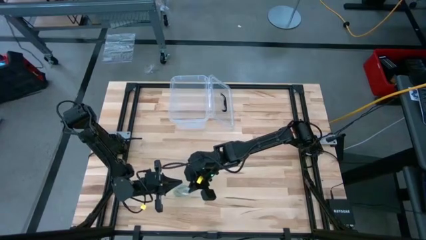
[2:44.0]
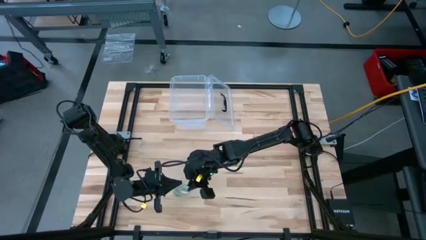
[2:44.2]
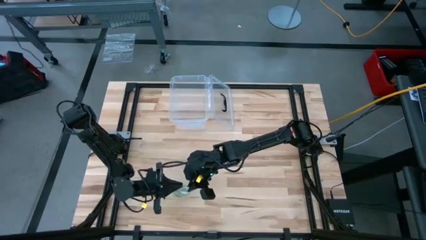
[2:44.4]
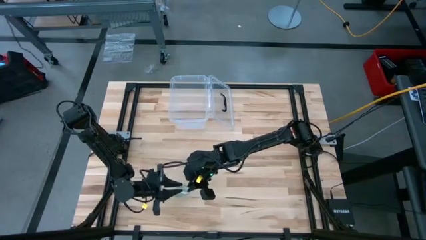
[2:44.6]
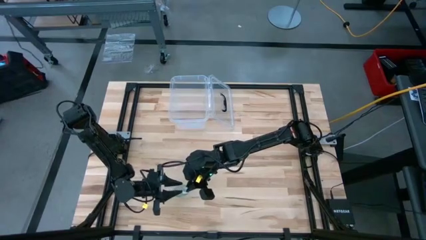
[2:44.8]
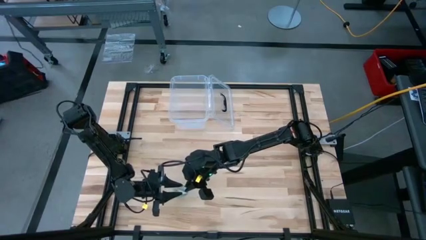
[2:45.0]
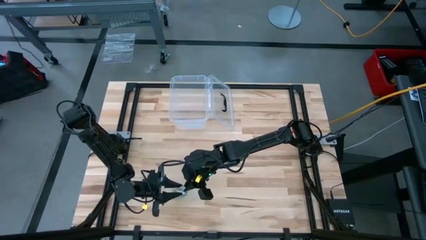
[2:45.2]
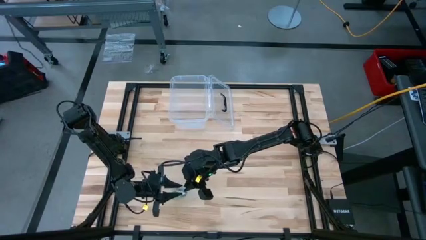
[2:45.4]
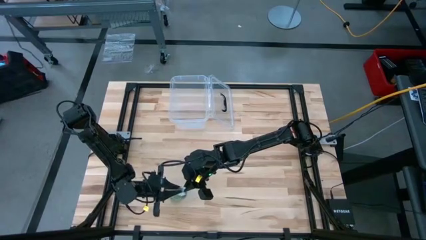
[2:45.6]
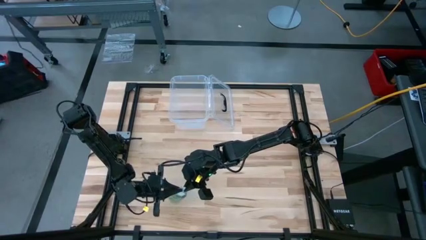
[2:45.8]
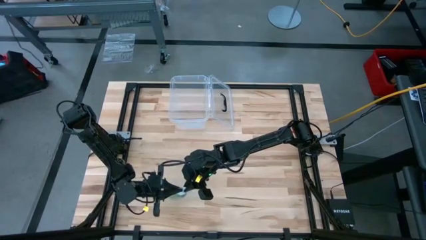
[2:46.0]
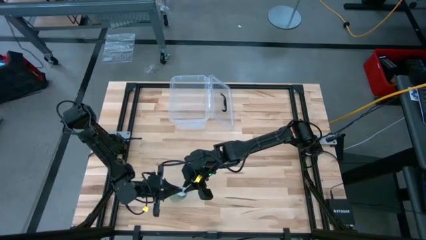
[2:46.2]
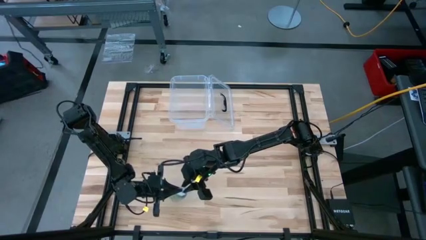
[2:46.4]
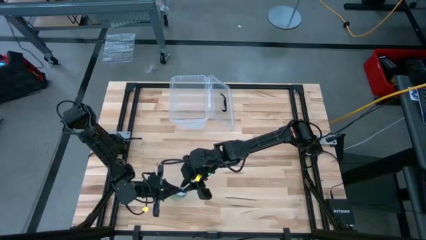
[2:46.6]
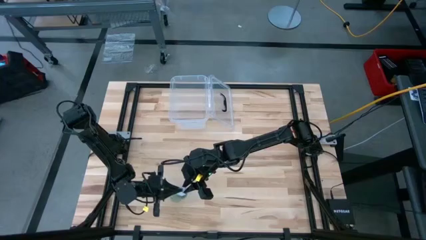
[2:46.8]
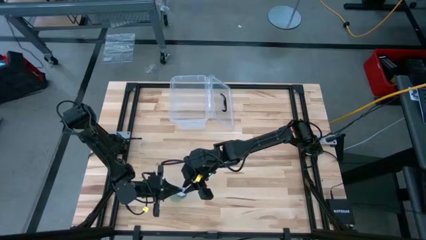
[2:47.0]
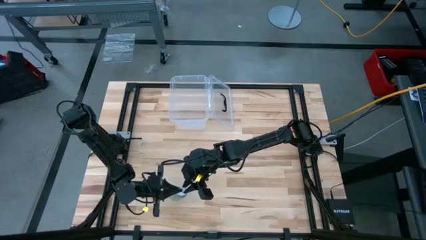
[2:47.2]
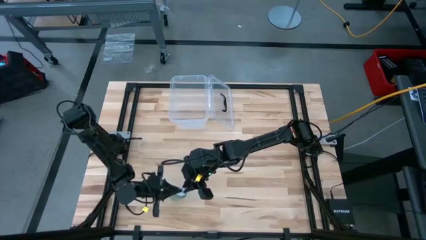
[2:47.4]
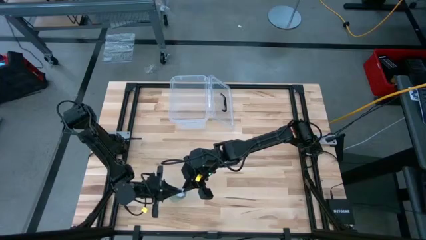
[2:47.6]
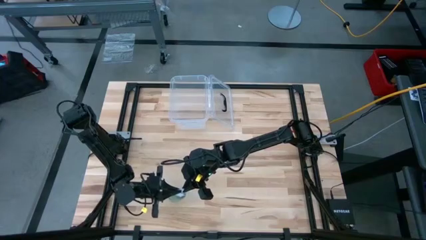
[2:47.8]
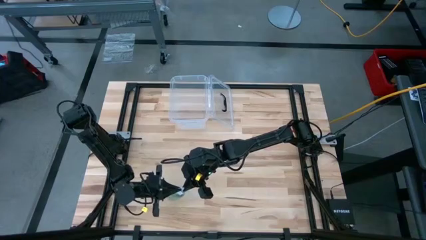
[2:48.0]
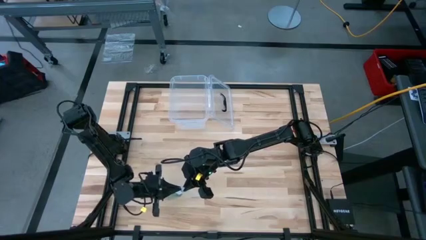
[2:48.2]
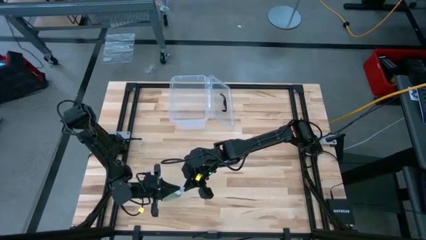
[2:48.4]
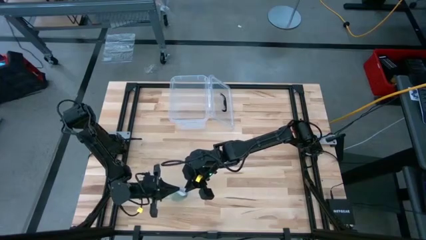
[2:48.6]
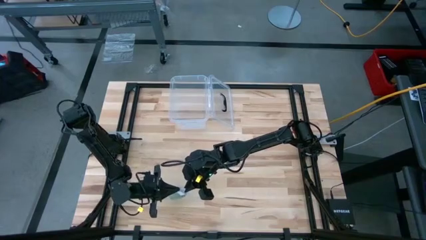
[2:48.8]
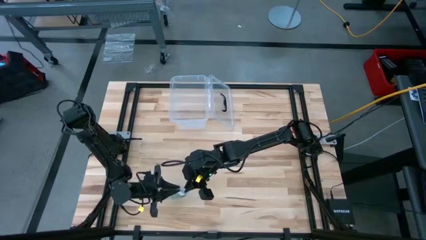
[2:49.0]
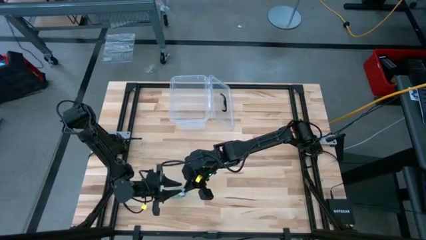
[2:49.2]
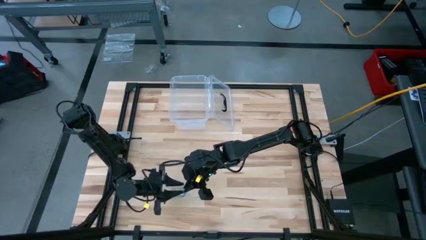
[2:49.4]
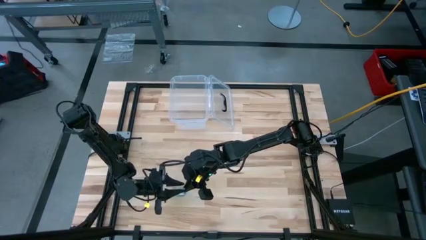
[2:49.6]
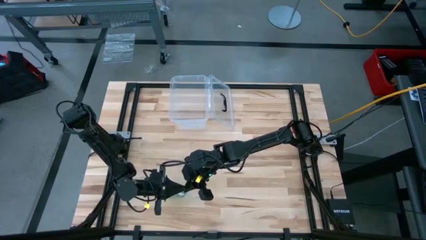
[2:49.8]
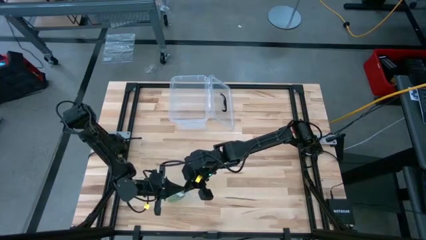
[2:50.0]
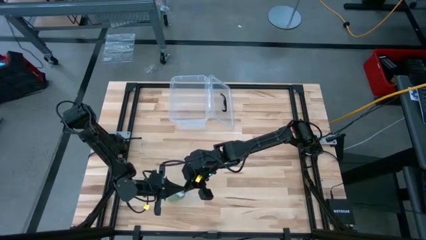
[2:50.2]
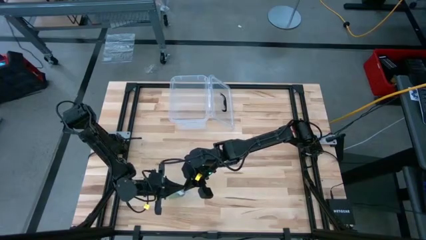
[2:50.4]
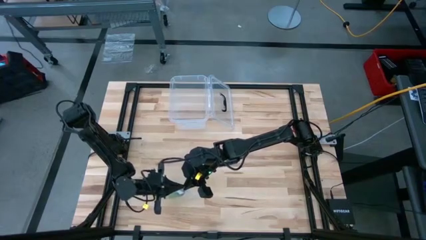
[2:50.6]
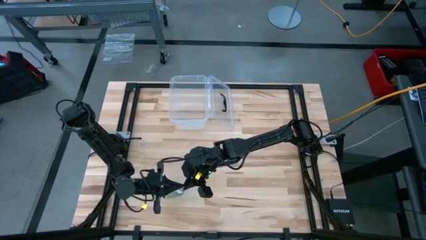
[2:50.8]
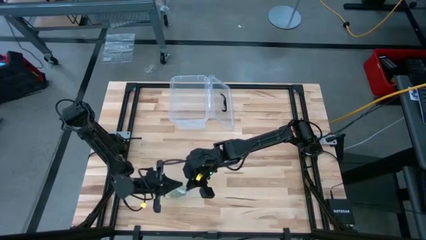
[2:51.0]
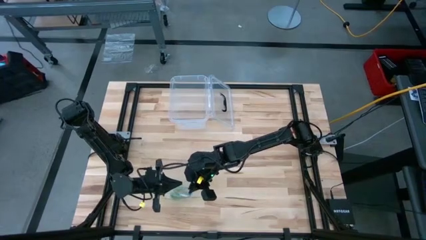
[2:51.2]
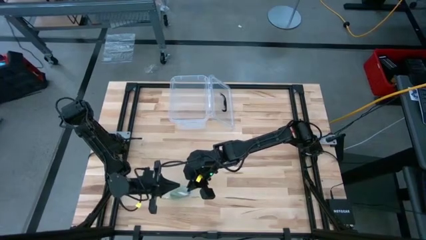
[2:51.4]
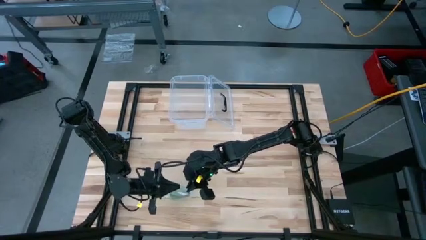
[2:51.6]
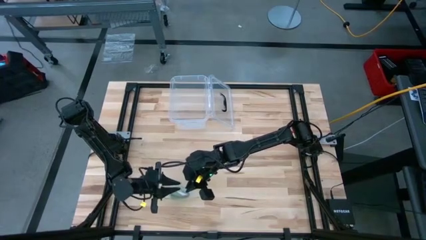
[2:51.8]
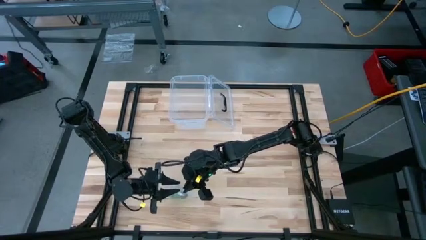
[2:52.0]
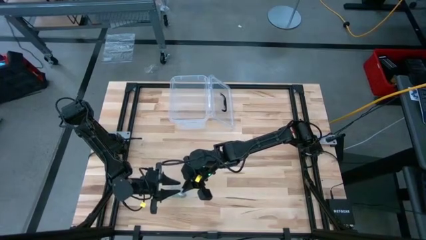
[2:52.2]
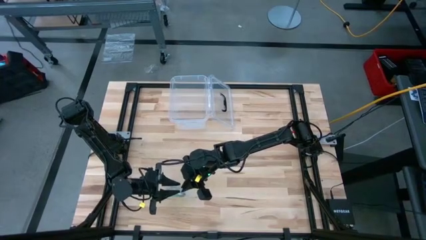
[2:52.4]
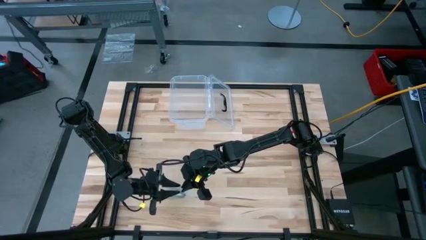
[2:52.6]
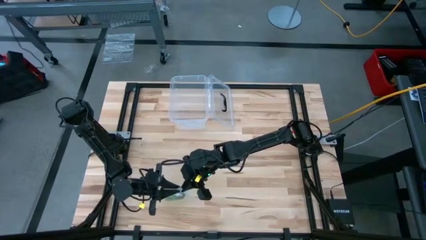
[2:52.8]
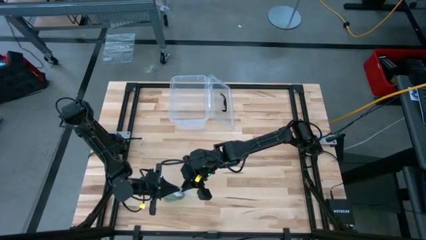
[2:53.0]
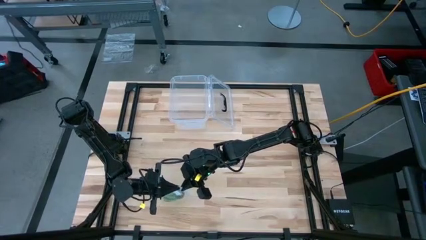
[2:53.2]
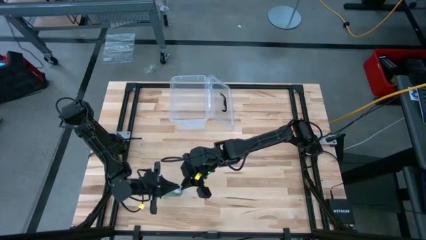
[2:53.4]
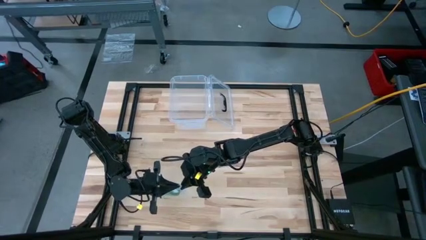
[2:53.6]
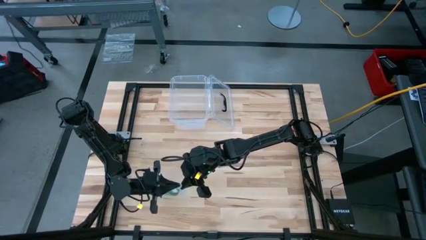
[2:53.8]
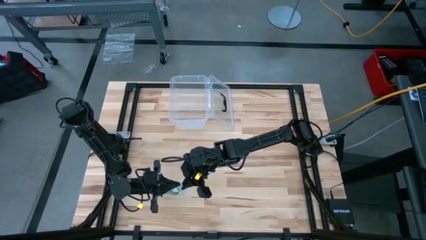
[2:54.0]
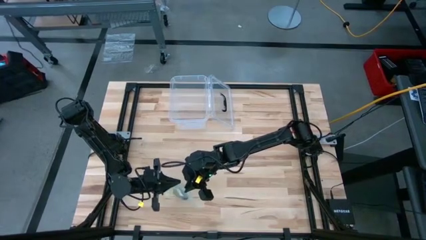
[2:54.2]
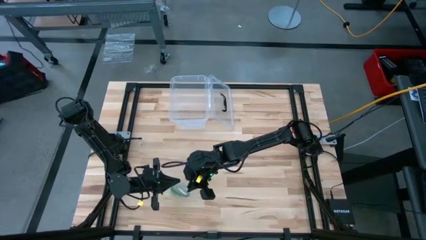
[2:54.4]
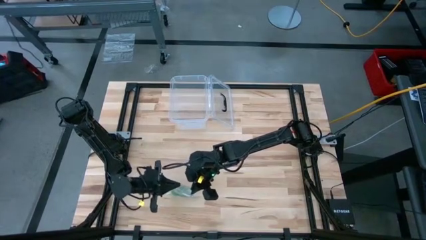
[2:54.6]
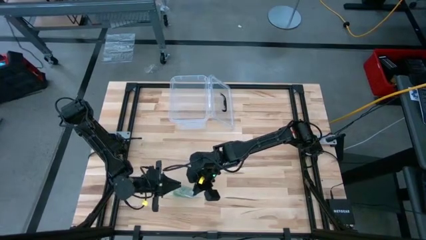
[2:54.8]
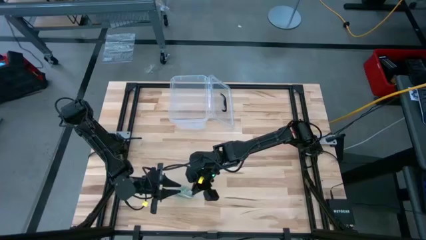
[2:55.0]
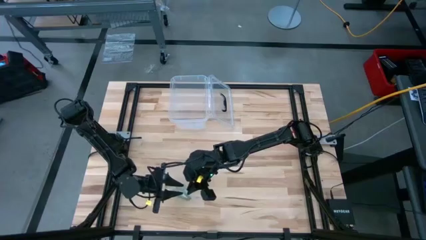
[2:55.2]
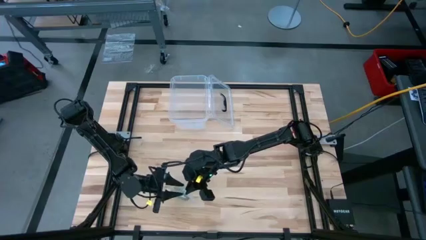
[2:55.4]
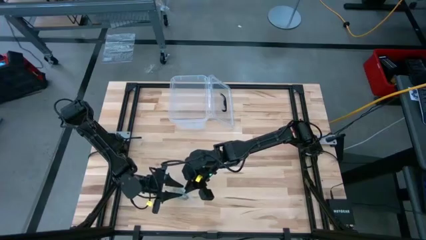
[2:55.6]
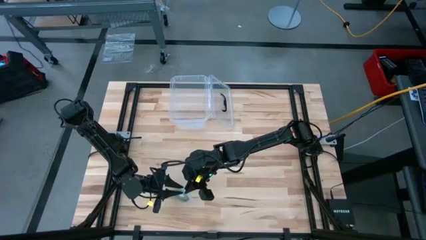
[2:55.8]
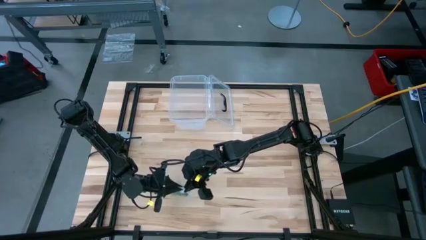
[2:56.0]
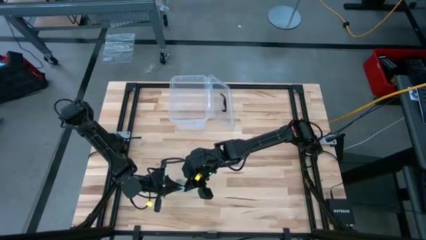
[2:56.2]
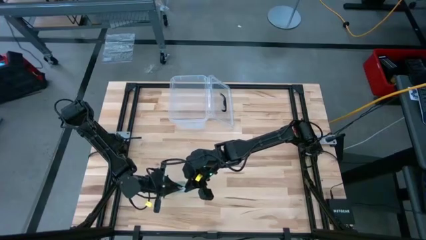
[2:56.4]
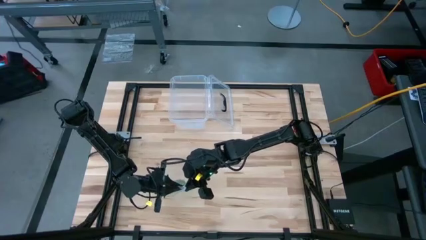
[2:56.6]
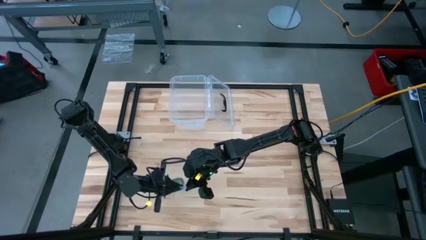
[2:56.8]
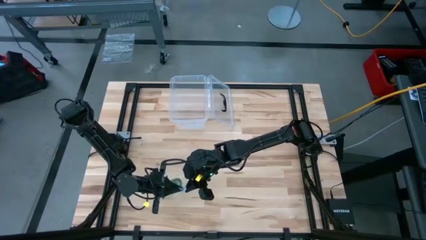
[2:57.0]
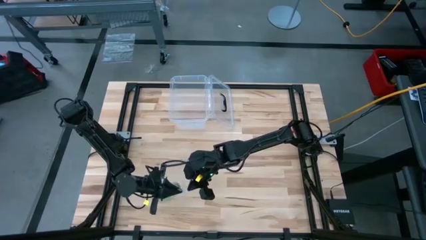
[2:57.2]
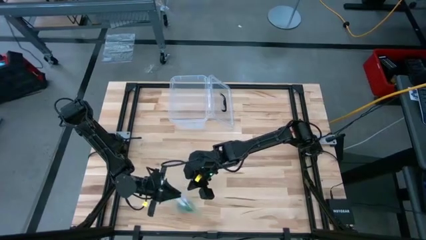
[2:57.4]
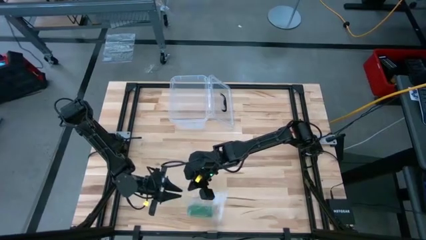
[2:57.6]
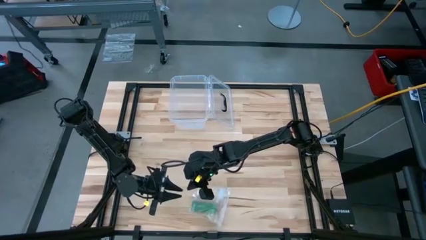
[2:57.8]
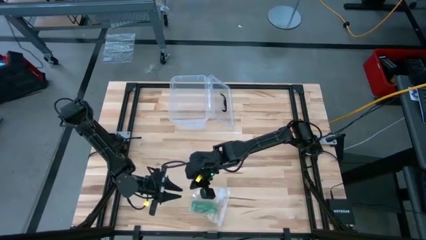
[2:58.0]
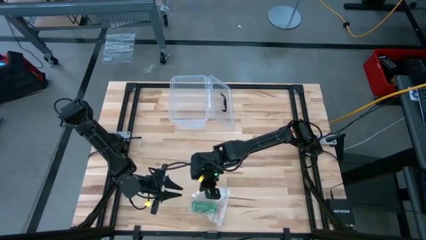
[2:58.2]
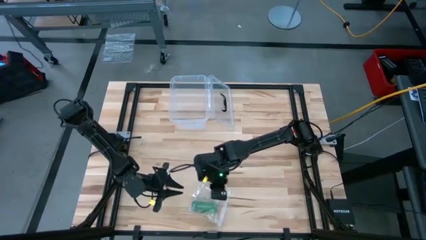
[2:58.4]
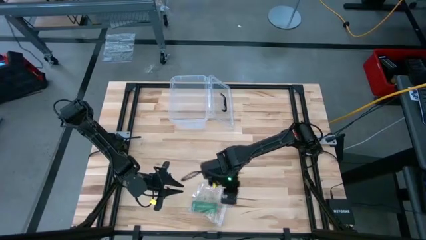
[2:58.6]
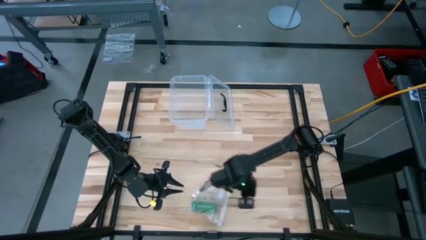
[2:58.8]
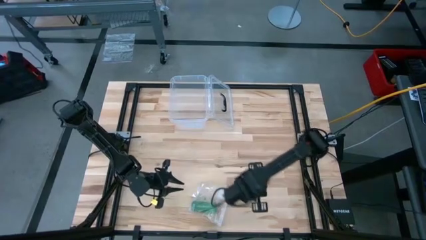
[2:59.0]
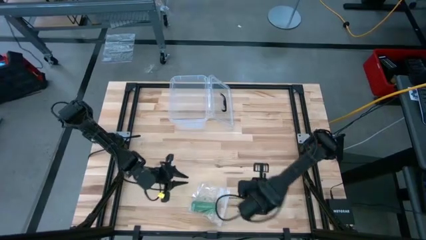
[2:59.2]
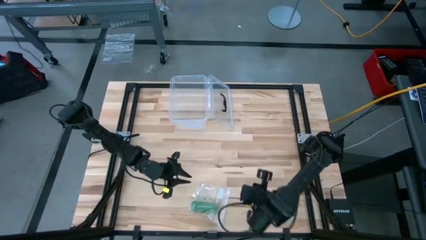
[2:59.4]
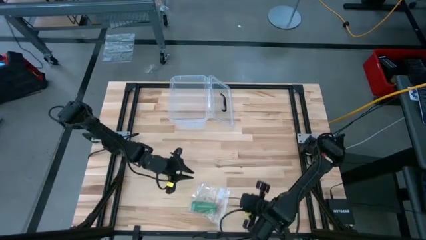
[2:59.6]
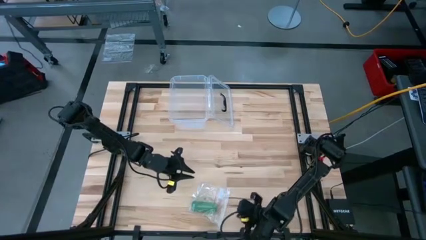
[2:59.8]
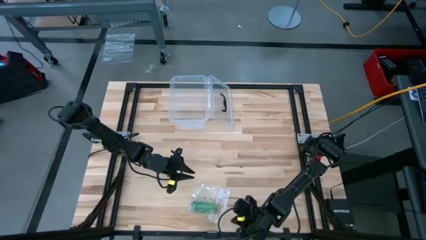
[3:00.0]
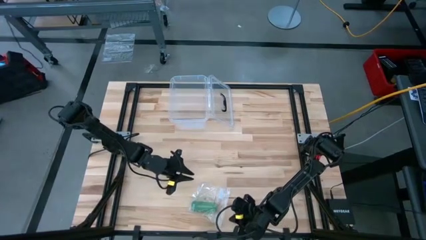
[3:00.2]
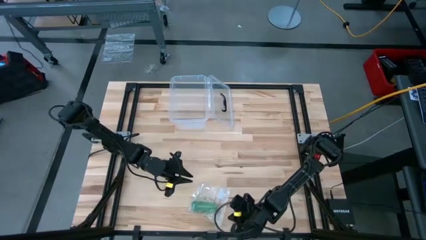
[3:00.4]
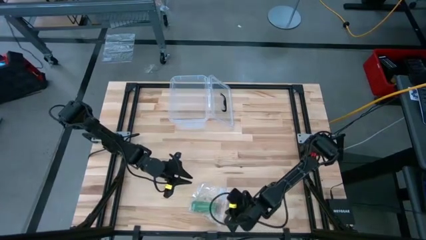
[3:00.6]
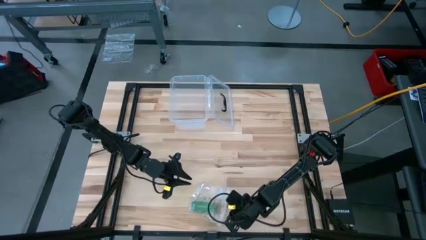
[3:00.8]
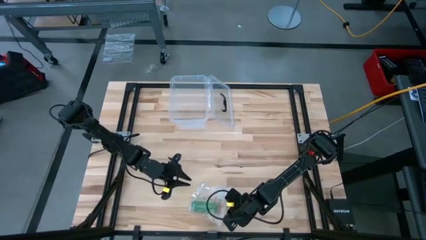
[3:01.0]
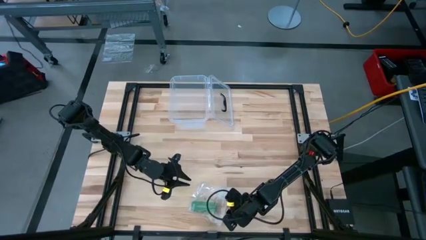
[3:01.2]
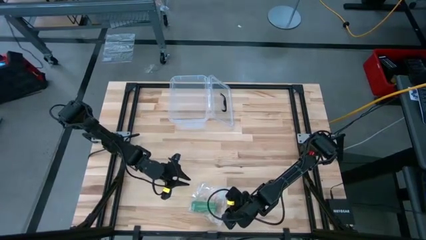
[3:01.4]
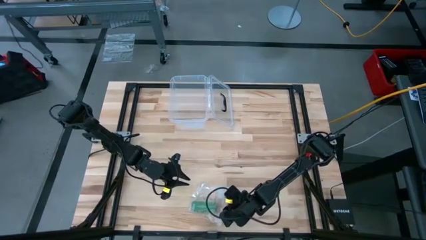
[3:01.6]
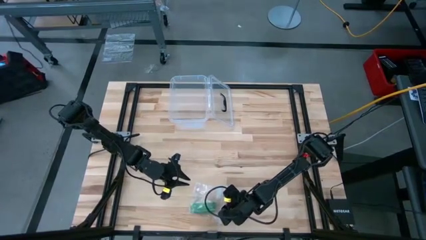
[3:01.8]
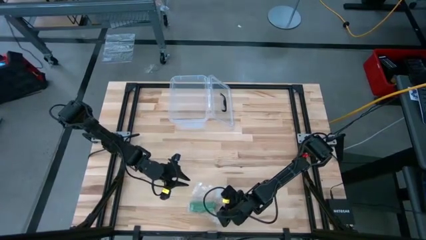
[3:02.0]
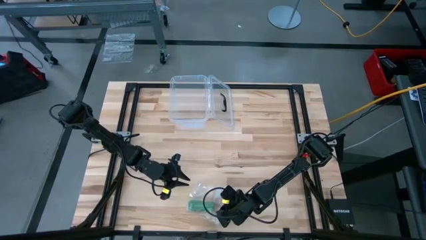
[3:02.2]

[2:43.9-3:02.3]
Task: Roll bandage
Close the transparent zip bag
